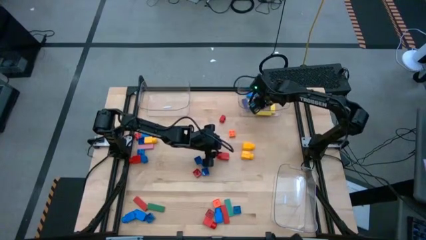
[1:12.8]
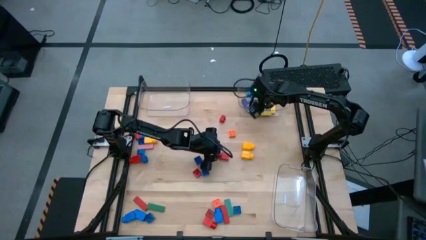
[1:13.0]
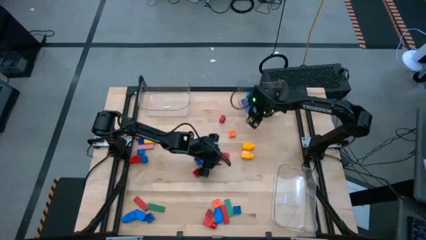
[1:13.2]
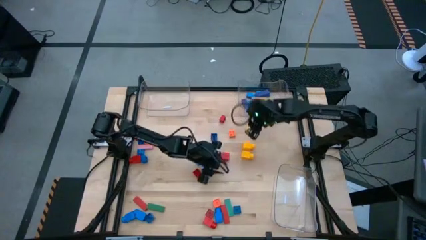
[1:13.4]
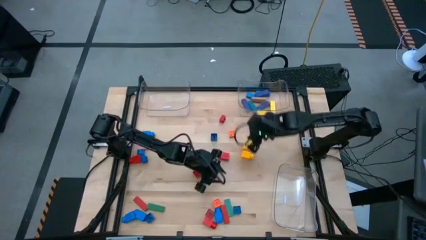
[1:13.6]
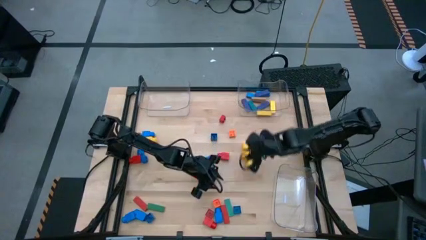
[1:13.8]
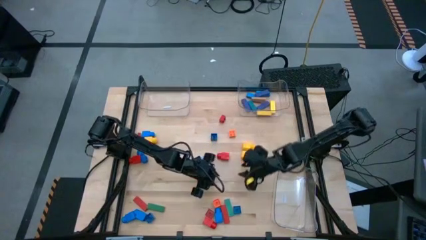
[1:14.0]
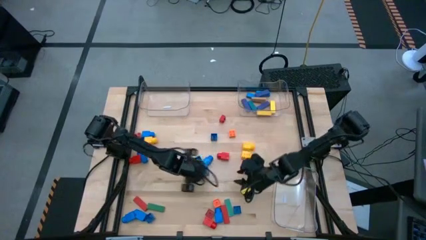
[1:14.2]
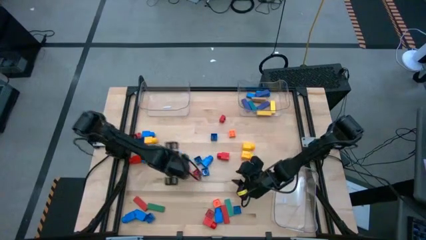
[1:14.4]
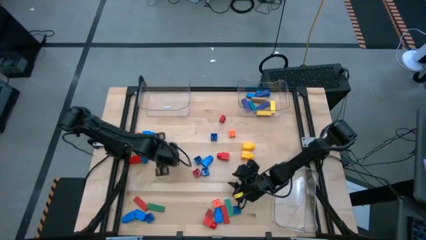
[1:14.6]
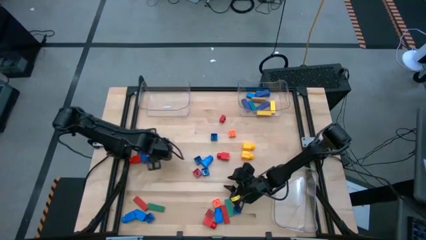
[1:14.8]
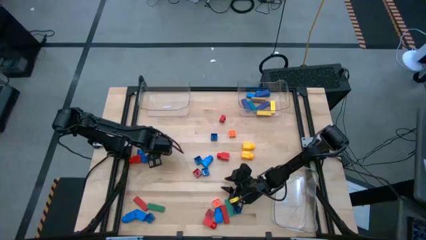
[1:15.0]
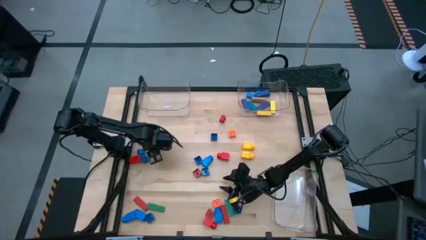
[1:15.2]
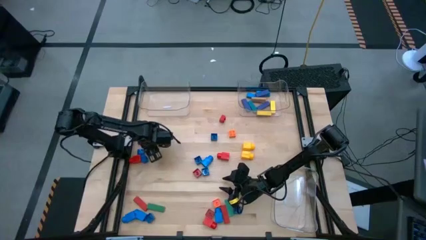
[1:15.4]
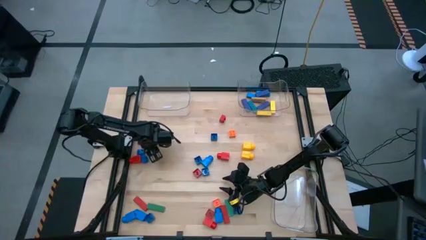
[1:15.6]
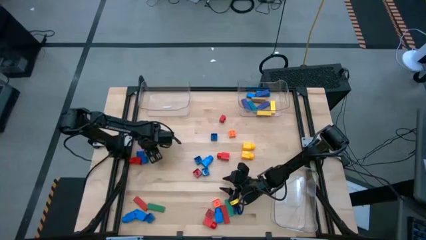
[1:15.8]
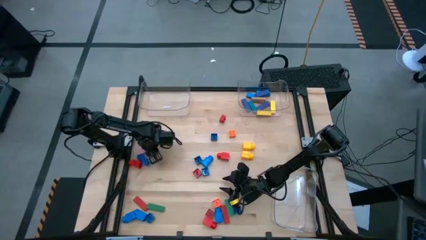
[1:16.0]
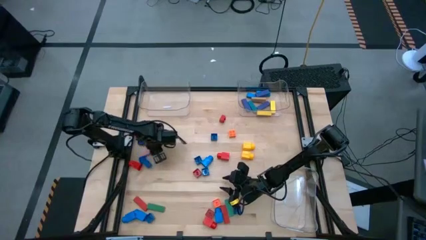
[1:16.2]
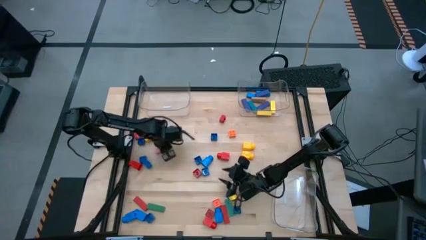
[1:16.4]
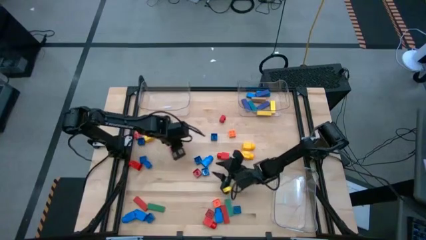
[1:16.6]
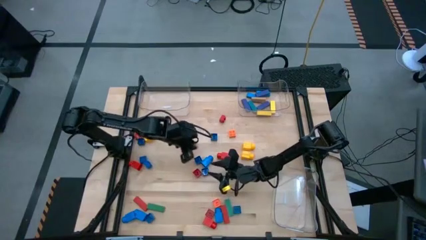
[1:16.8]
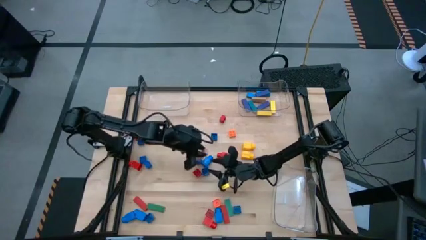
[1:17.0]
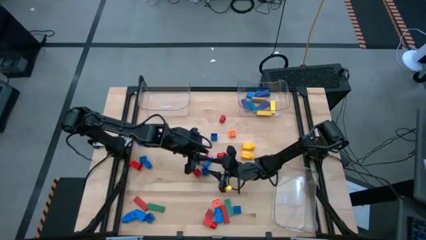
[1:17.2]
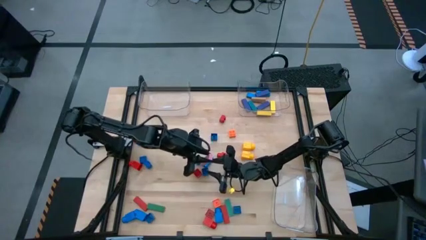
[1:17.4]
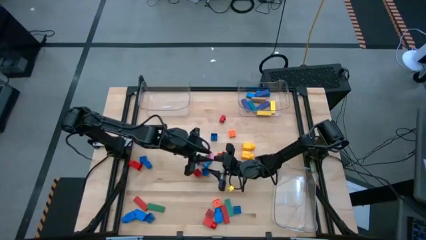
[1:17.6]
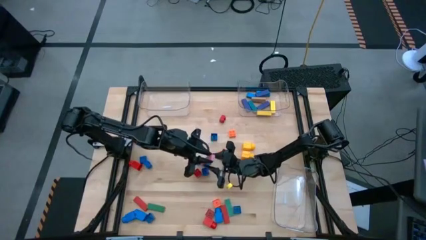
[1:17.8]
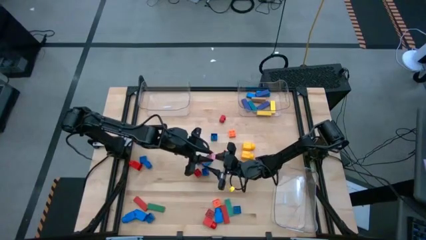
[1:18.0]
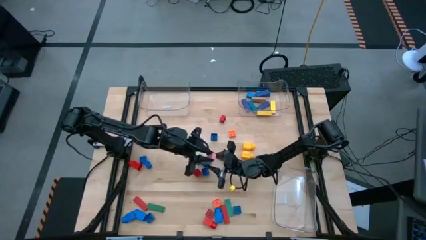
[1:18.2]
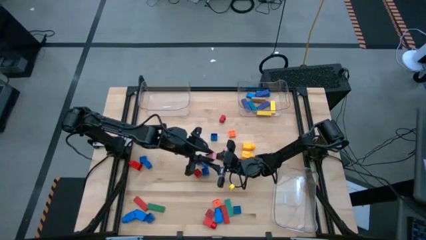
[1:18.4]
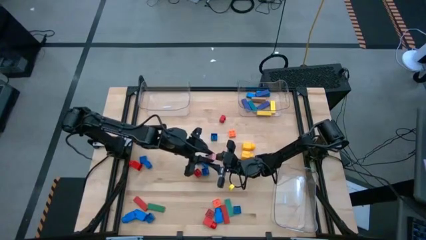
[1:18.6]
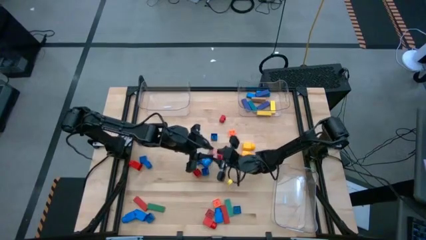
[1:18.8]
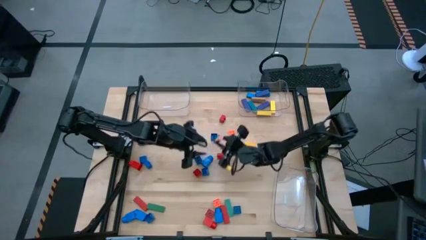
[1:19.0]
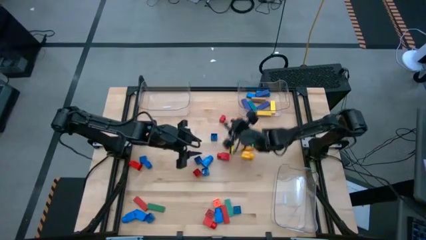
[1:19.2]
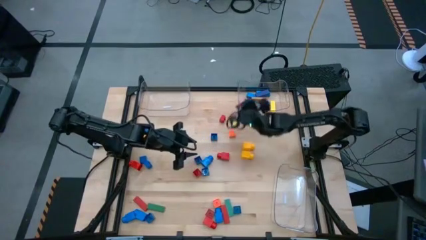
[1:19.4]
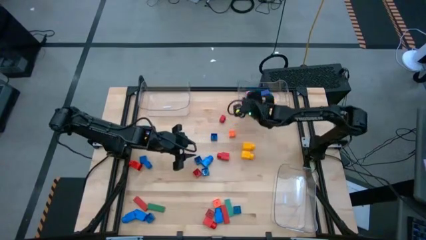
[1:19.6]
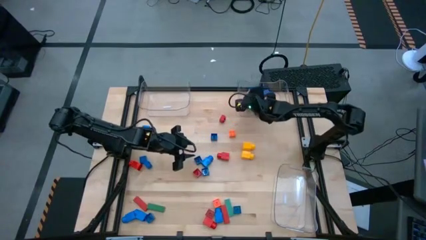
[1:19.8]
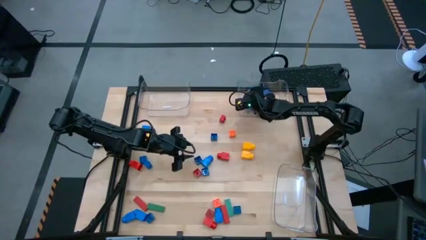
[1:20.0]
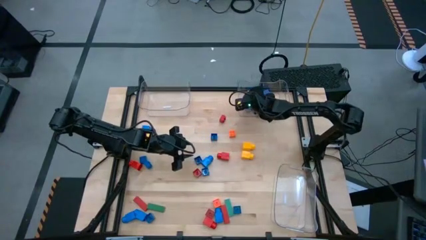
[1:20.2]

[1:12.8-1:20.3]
Task: Sort blocks by size
Put the pink block into the top right transparent bin

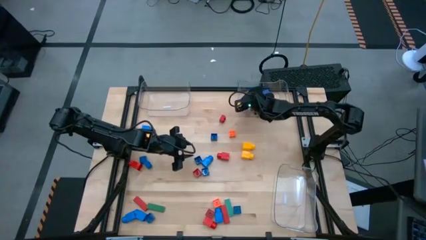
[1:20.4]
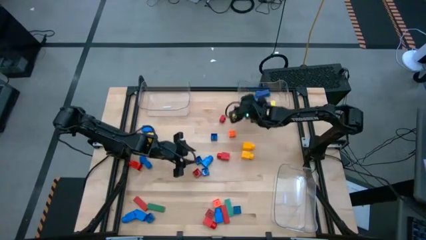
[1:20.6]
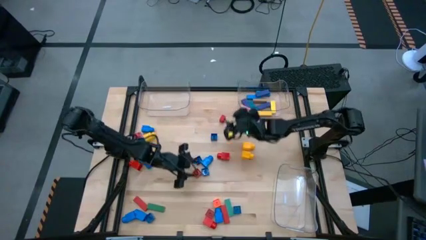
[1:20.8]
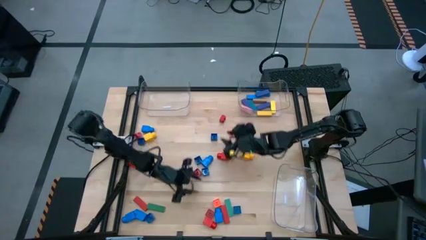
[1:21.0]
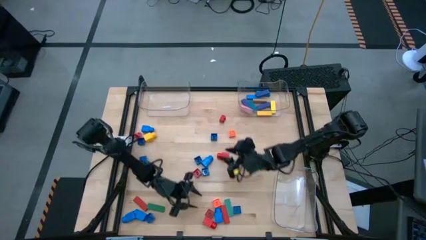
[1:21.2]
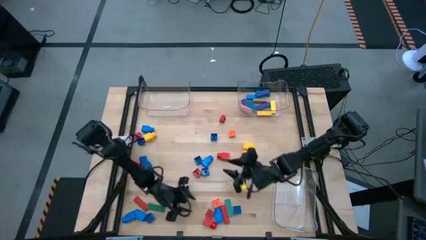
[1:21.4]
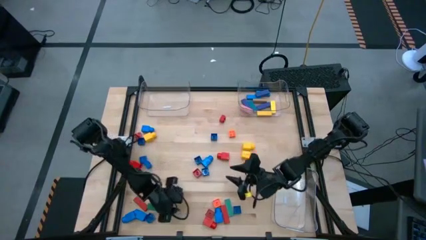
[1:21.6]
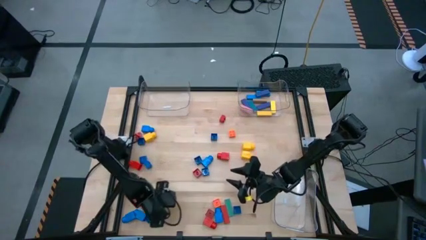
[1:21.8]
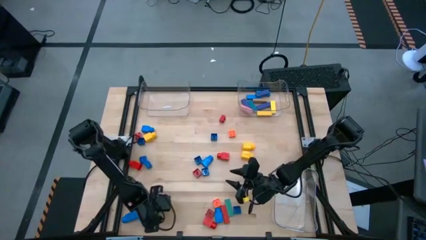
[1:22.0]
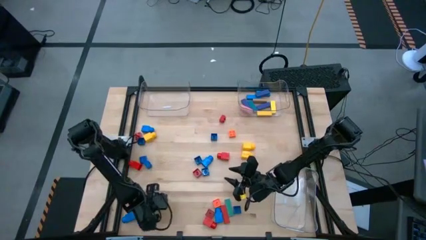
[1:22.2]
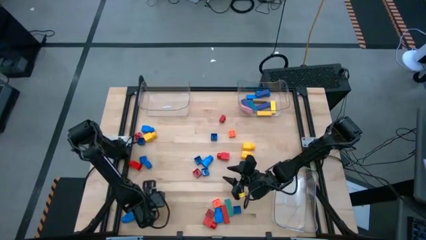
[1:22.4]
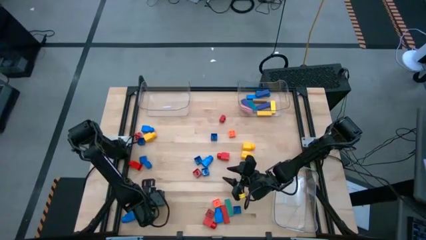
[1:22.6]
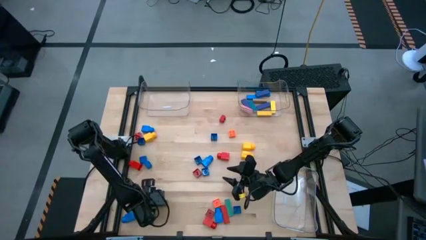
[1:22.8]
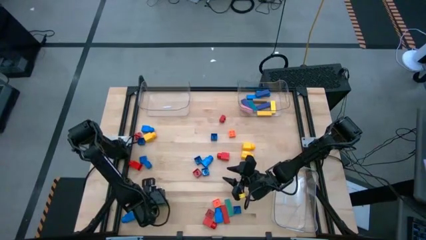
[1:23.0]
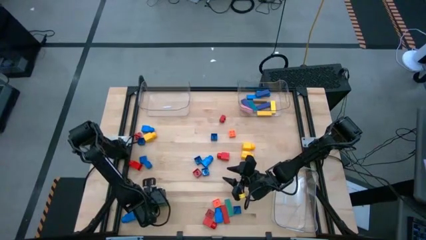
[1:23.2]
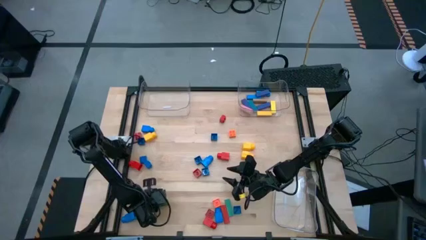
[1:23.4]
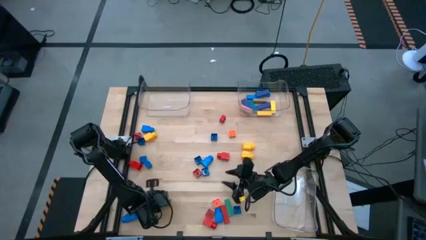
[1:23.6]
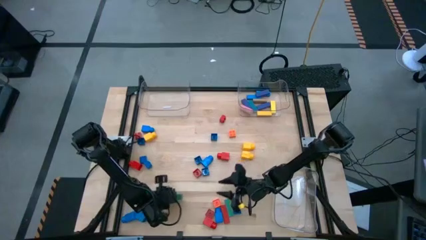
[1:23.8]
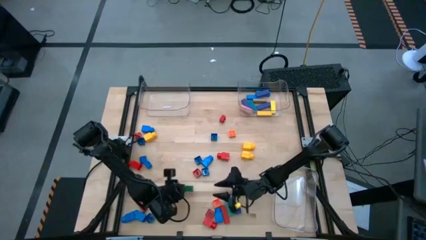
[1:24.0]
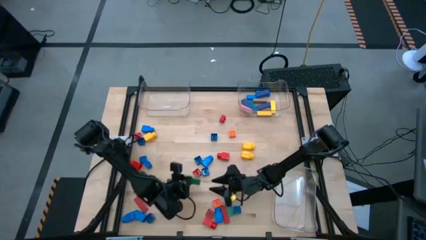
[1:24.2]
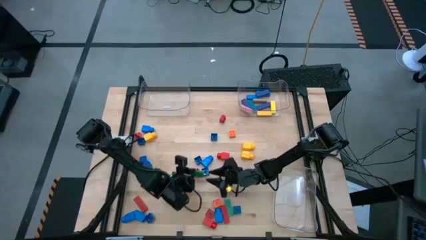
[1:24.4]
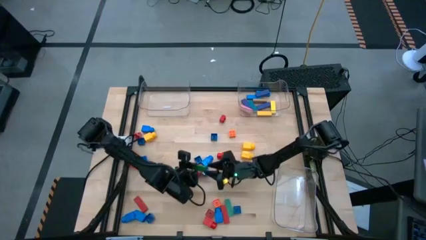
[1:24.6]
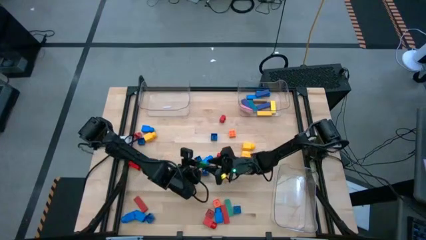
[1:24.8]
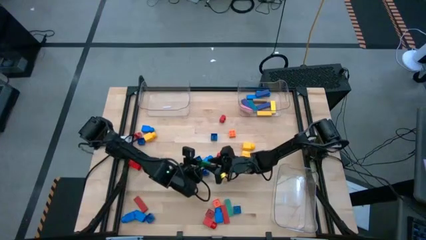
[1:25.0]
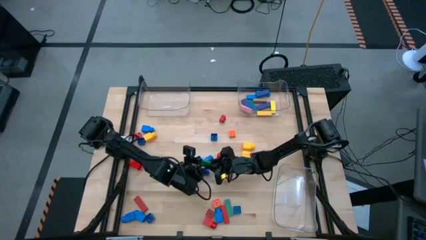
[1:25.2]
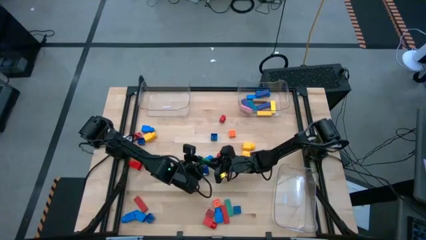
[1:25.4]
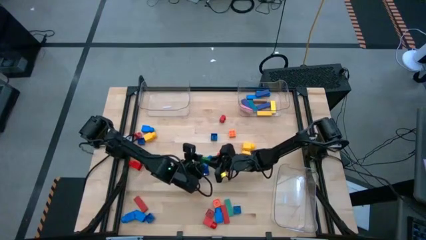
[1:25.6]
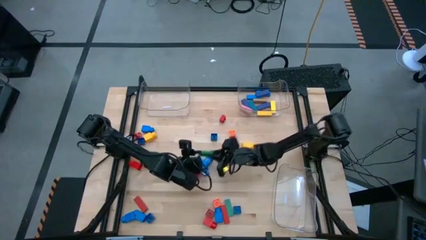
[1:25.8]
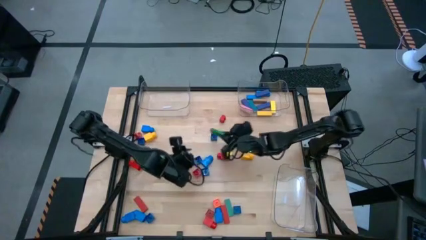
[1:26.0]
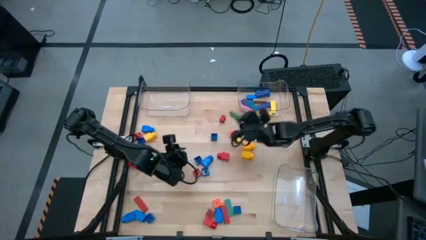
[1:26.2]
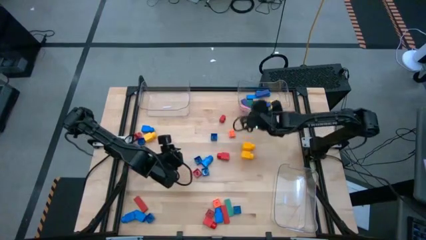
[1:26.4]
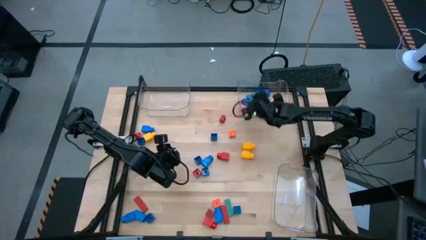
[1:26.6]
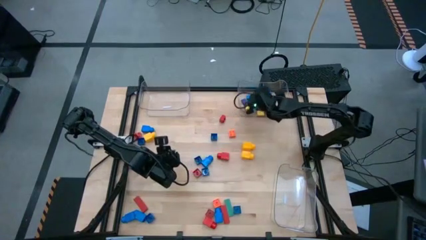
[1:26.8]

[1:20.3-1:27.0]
Put the green block into the top right transparent bin

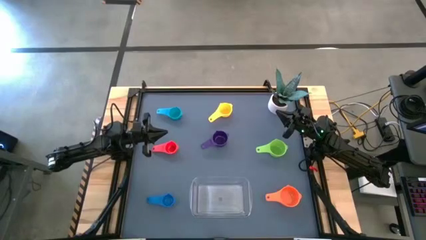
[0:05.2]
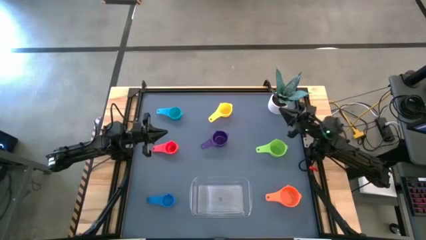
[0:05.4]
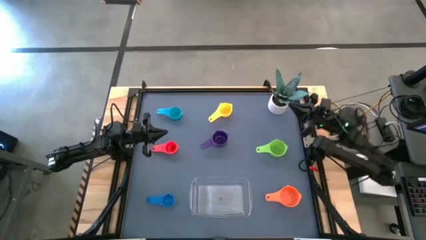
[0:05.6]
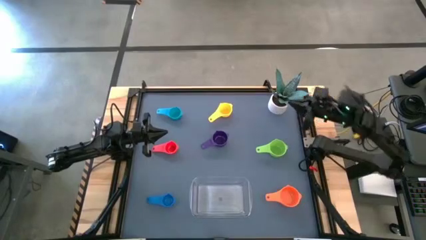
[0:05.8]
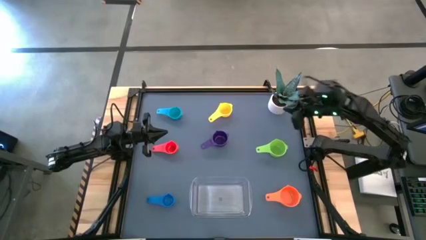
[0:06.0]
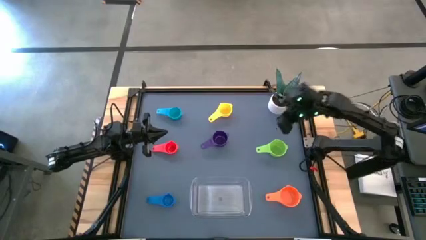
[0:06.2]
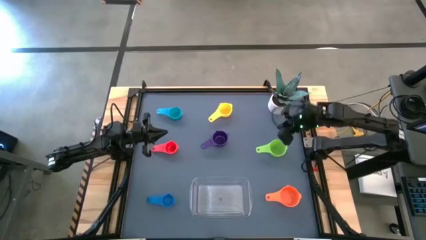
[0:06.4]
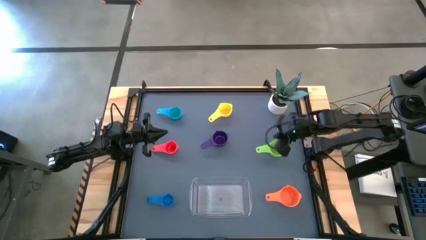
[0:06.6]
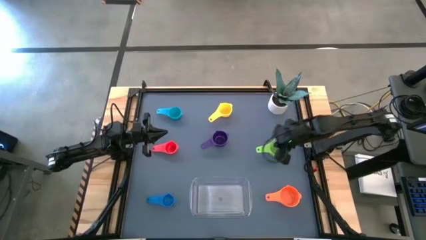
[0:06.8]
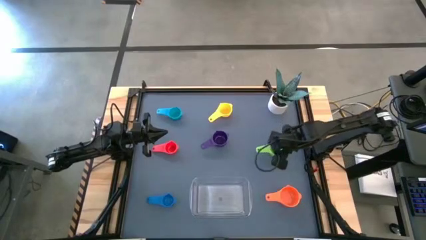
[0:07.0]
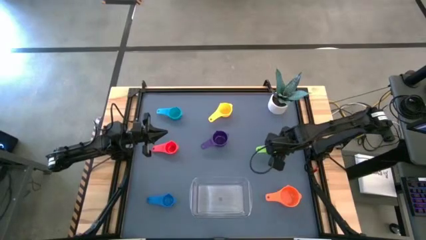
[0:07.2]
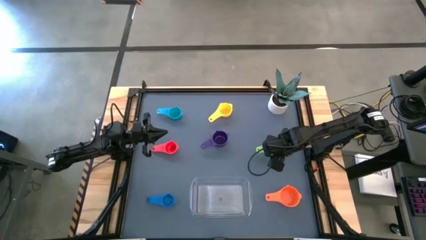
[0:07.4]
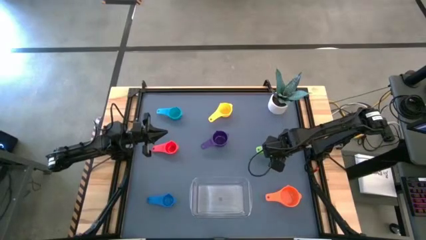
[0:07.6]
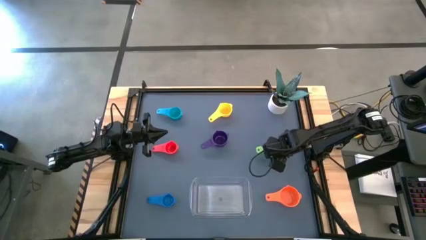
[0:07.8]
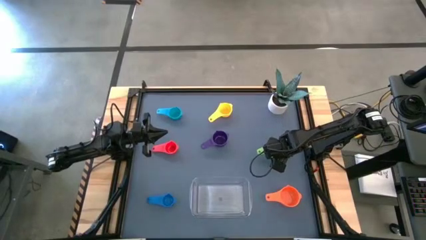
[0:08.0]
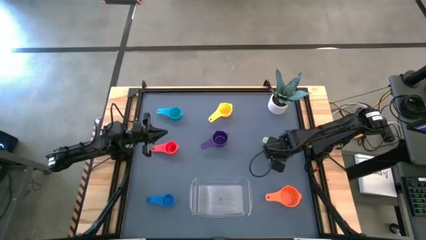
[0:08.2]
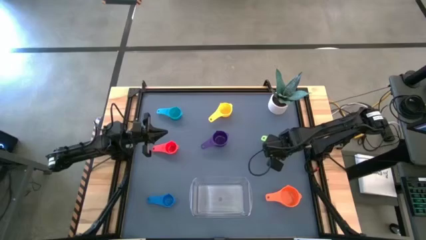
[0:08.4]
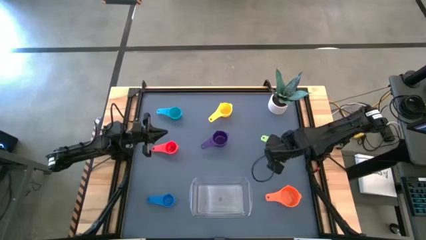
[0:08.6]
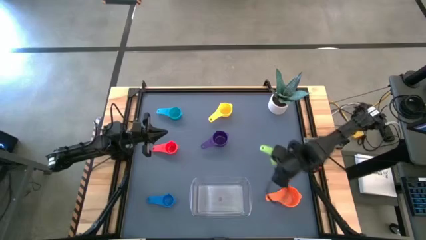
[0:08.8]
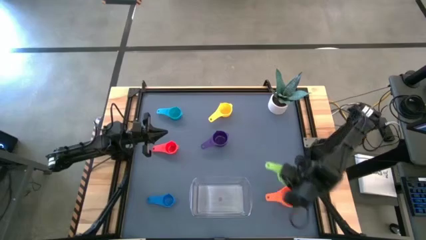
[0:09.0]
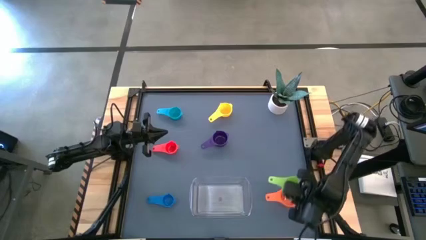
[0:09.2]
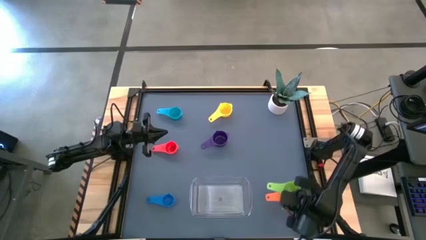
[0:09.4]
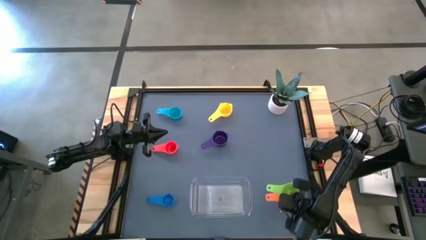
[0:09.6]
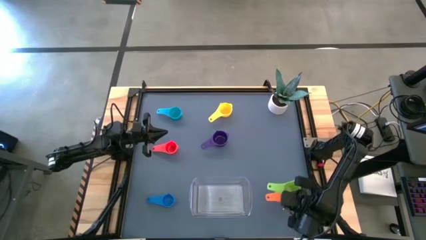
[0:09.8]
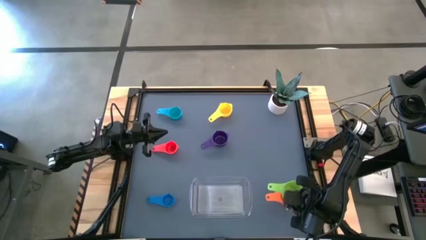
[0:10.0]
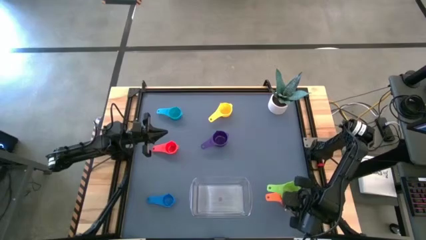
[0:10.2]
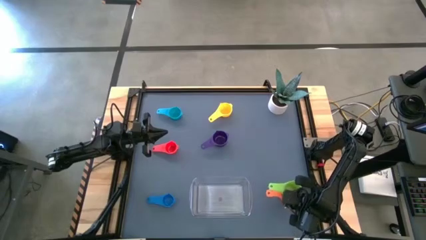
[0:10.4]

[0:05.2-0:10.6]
Task: Nest measuring cups in basket
Stack the green measuring cup on top of the orange measuring cup
